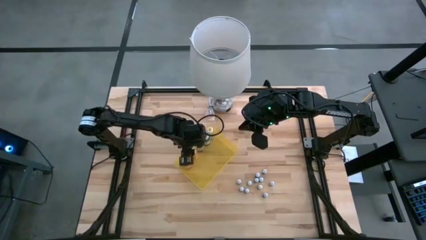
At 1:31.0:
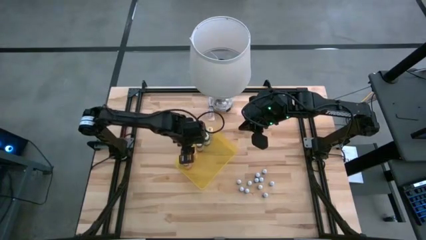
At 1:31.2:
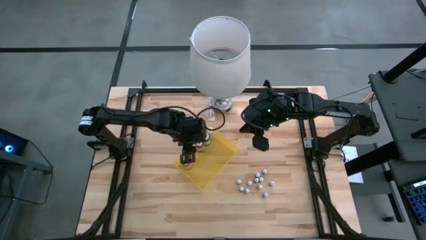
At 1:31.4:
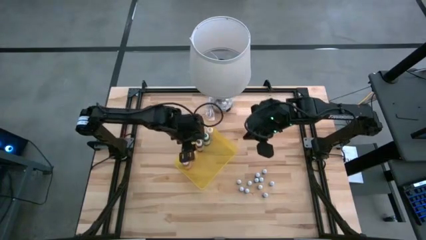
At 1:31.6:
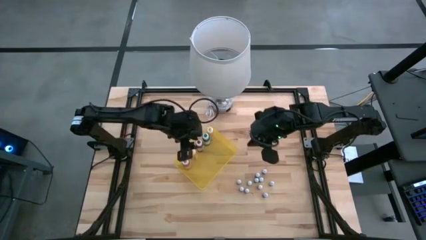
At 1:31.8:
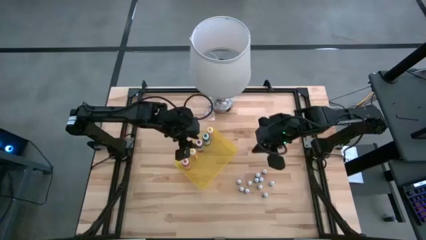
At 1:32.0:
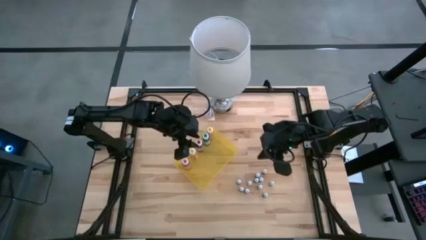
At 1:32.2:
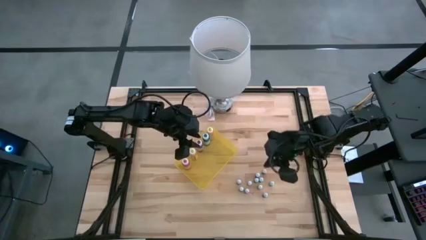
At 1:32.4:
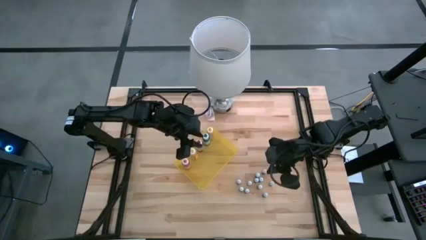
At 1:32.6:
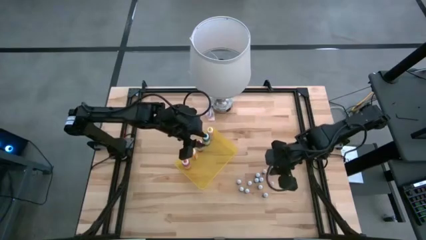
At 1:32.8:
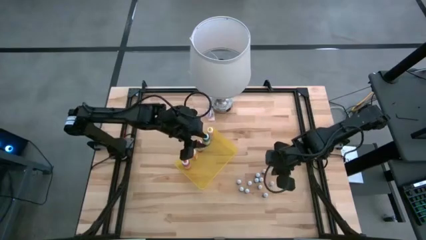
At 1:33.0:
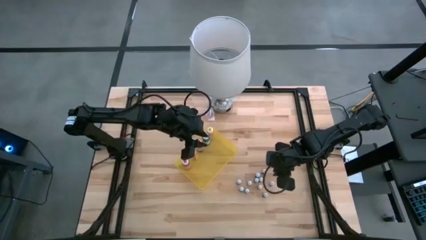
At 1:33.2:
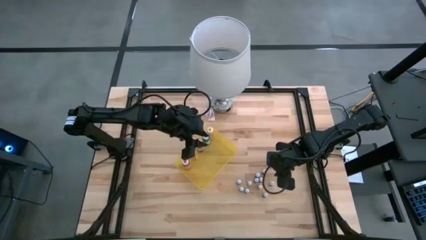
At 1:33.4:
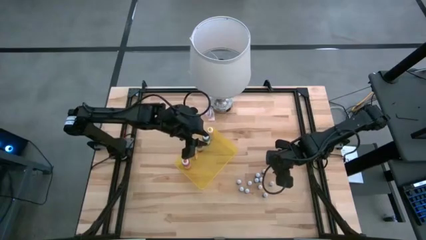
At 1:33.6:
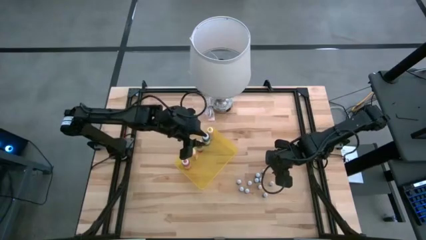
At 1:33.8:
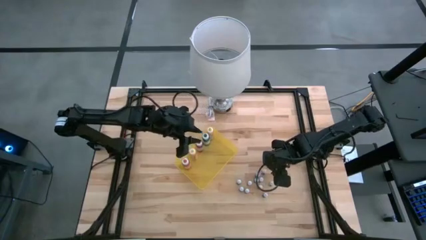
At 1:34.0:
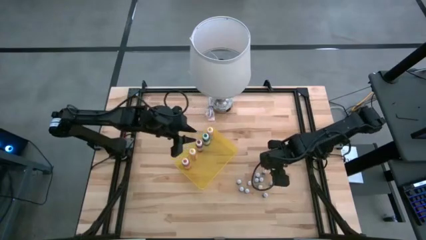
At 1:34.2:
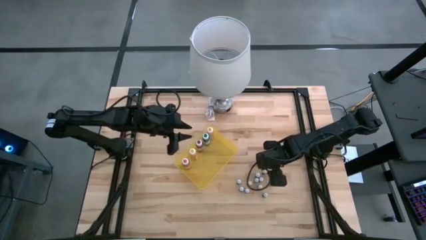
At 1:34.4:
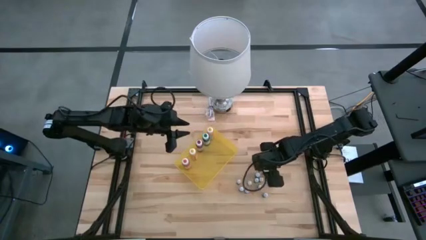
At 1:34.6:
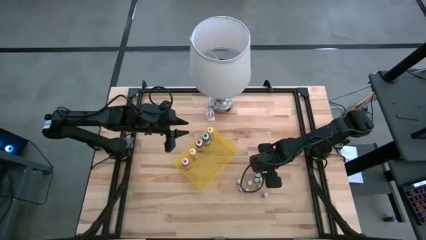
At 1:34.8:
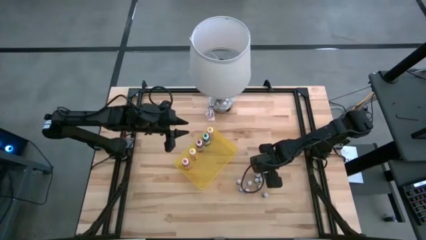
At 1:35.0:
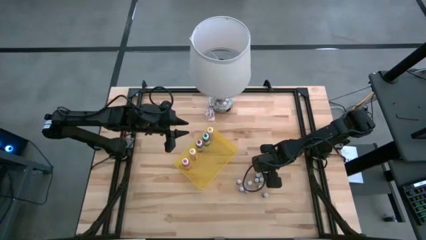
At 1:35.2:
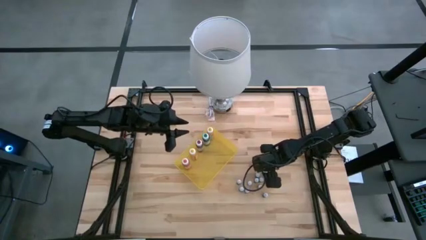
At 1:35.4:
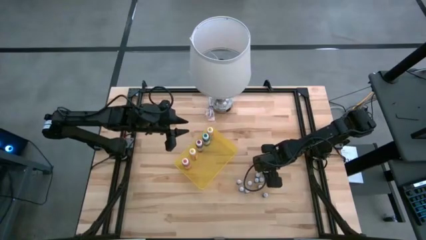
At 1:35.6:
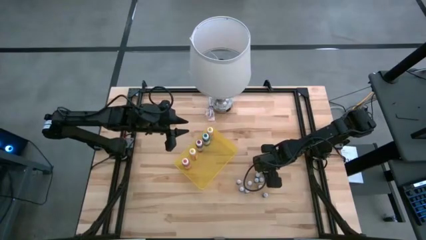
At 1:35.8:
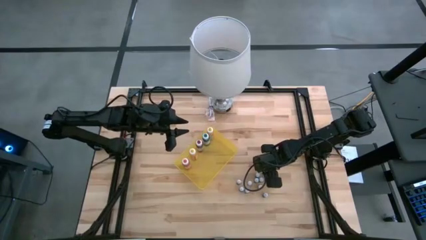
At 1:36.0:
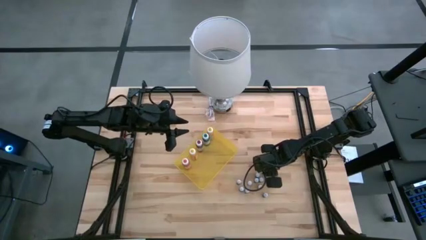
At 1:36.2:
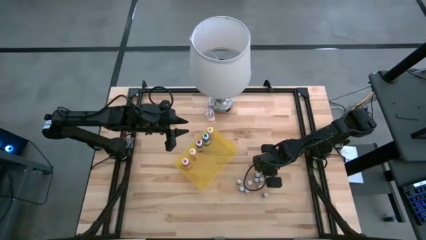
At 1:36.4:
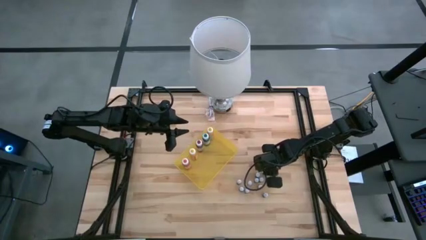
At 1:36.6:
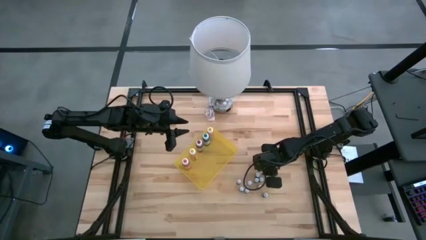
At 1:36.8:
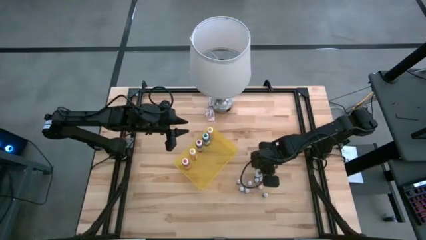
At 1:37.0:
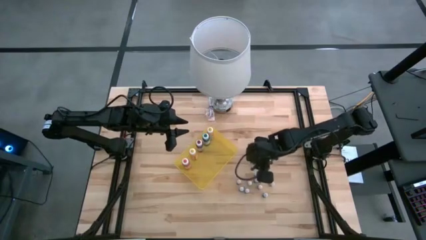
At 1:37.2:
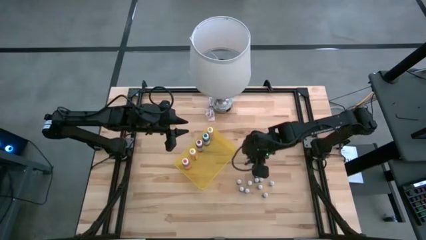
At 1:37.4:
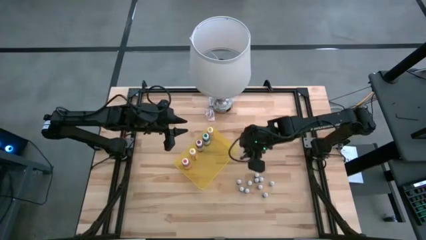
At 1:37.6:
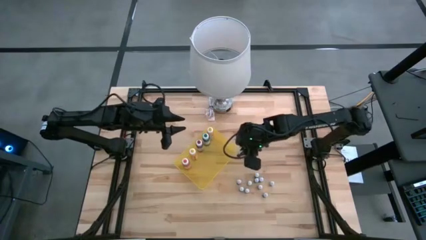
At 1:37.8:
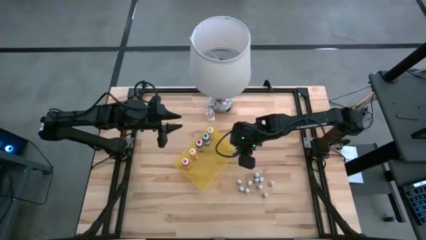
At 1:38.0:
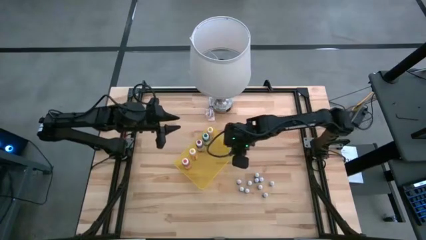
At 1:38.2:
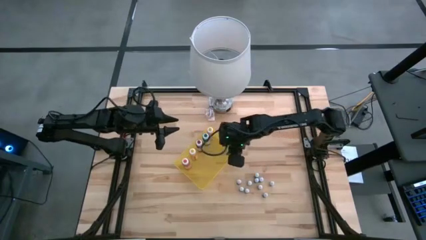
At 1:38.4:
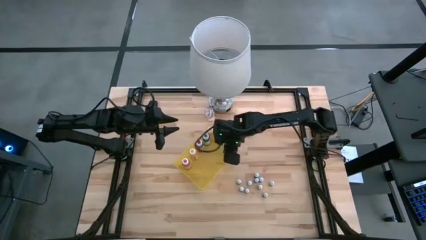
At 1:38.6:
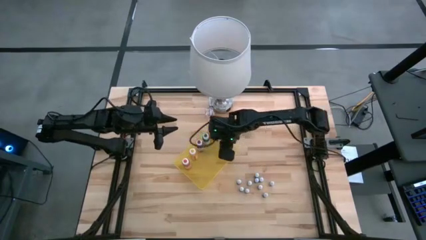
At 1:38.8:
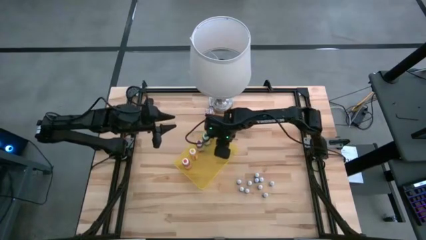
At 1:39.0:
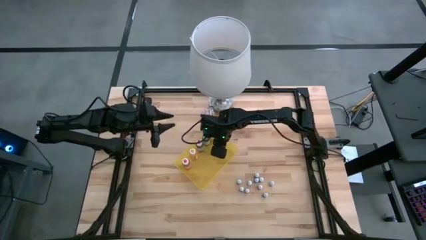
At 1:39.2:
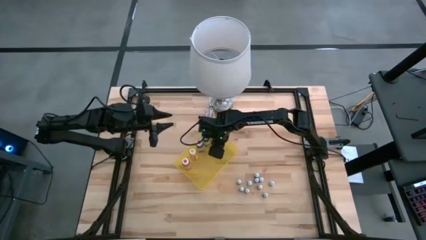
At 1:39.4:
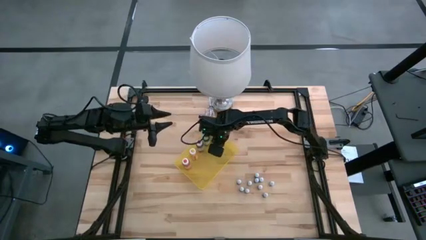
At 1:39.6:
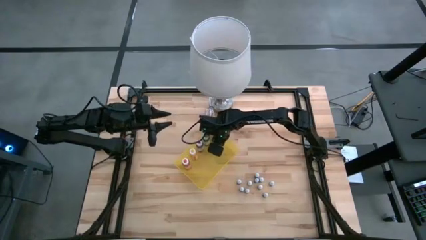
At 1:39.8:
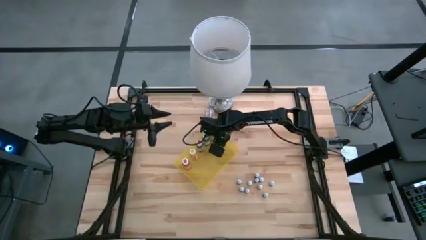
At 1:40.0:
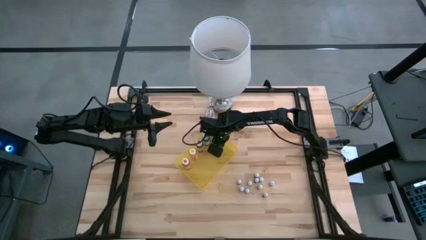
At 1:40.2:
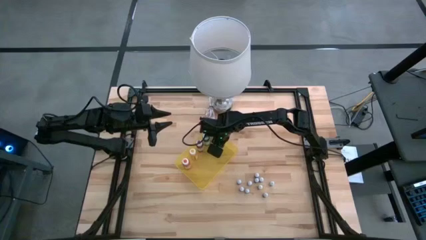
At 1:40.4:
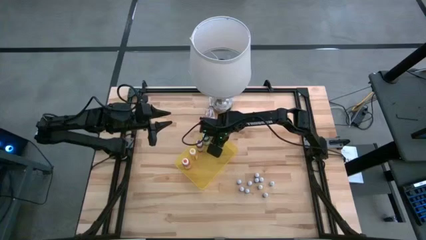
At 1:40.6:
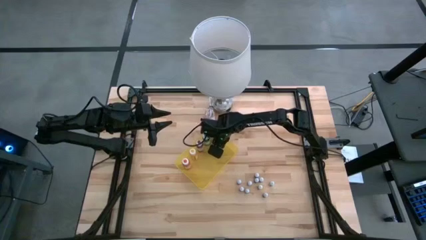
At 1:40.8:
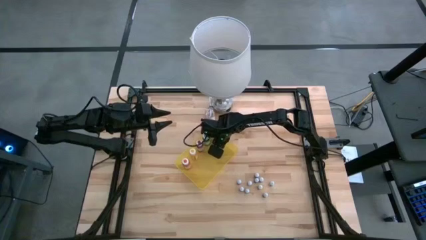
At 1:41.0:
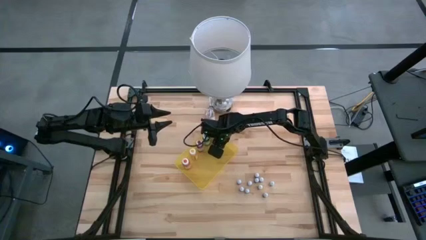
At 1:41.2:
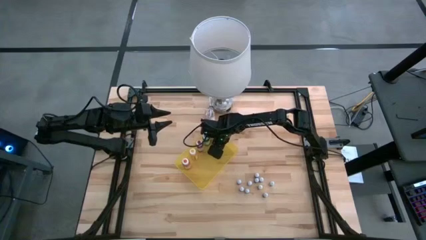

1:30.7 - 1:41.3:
Task: Pick & Place food coloring
Put the small top orange food coloring bottle into the yellow bin

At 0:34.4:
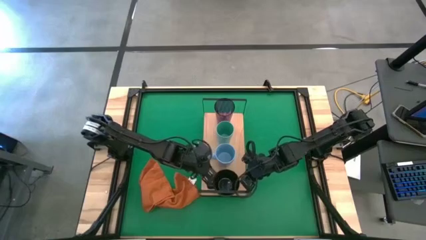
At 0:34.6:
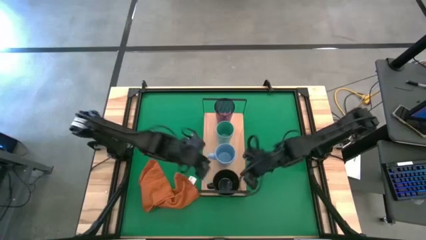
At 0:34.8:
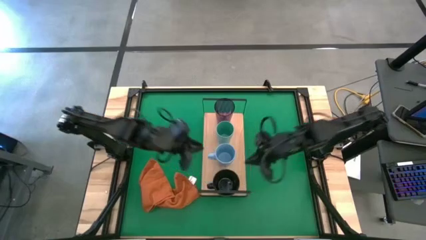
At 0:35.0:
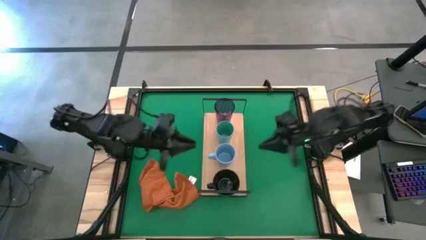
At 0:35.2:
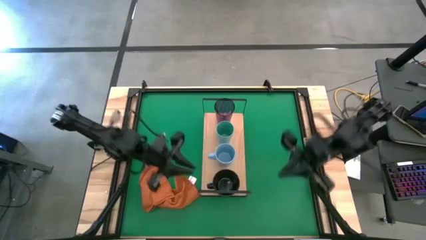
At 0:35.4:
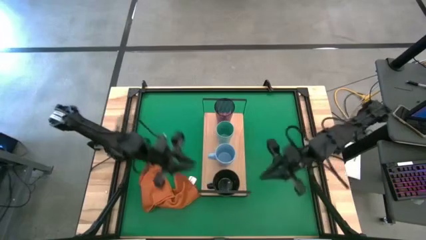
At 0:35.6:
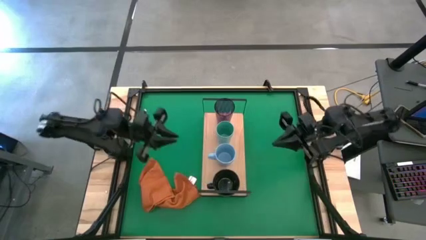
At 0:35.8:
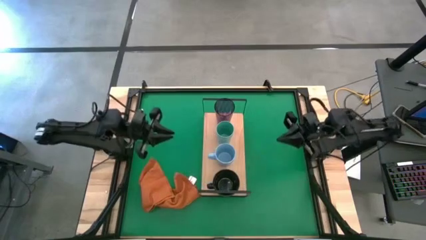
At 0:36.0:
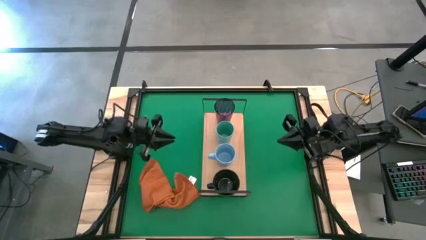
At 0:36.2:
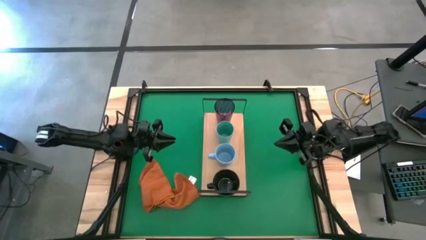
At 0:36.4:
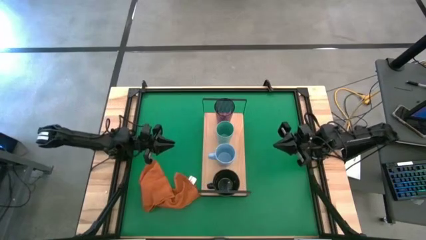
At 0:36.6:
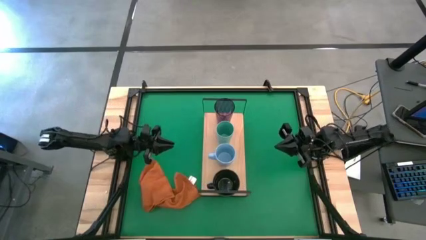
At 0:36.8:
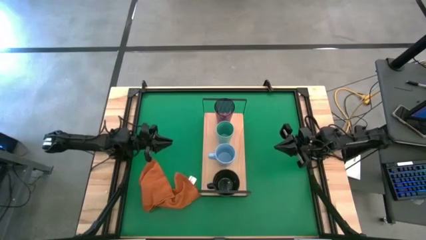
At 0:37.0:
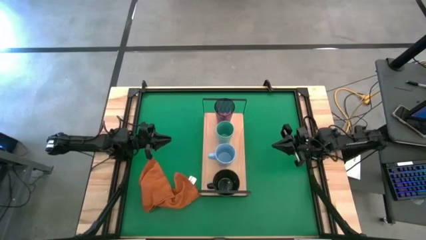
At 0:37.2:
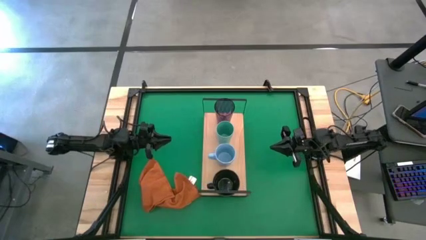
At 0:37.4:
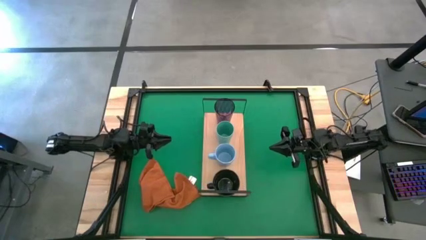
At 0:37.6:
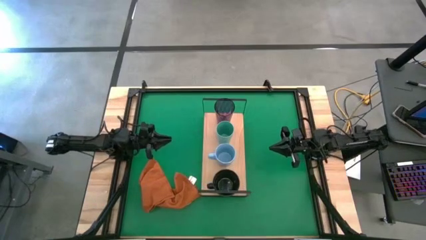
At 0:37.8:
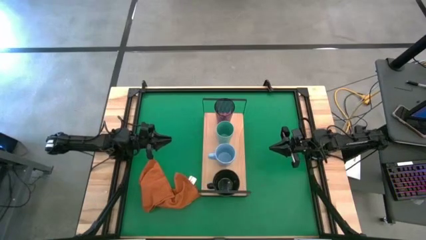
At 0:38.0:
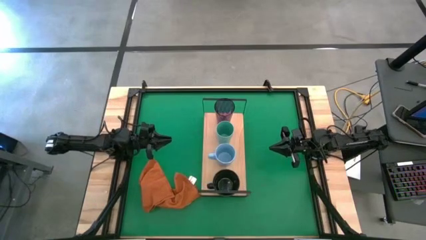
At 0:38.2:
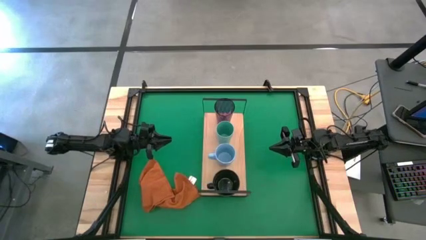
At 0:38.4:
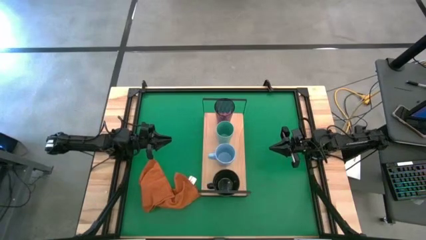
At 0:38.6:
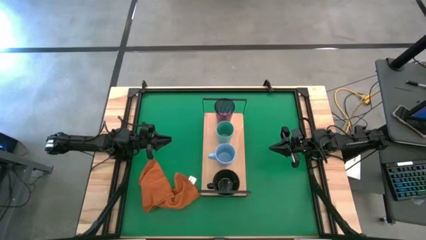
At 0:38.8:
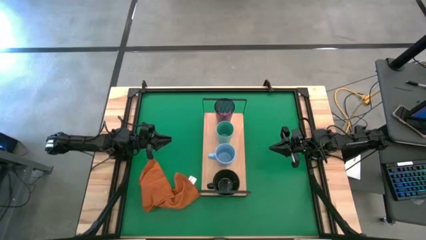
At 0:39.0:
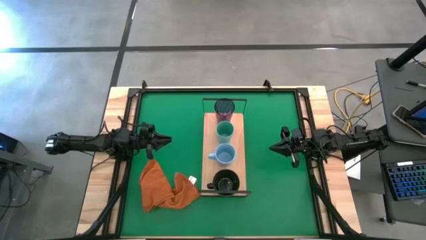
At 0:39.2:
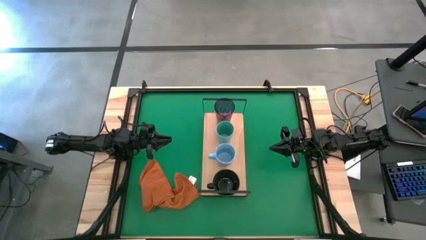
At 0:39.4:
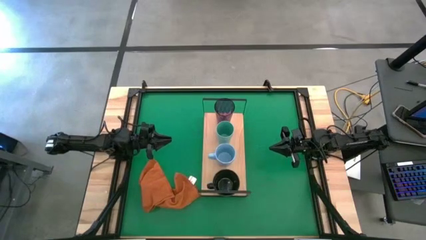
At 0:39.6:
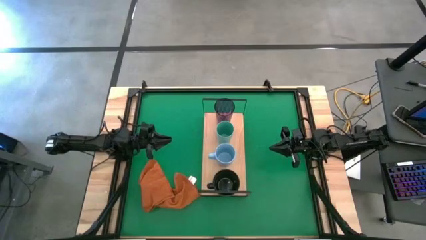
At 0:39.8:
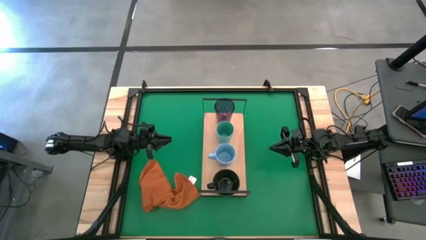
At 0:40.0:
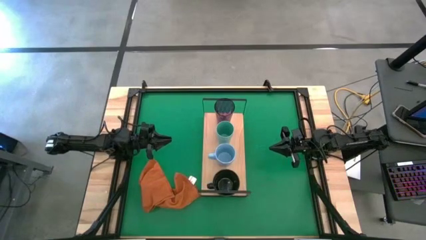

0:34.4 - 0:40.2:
Task: Stack small to large cups/mugs on shelf
Return to Home Position
